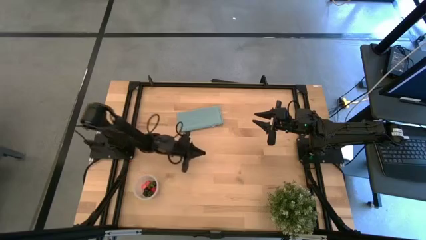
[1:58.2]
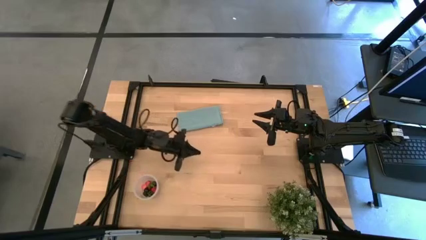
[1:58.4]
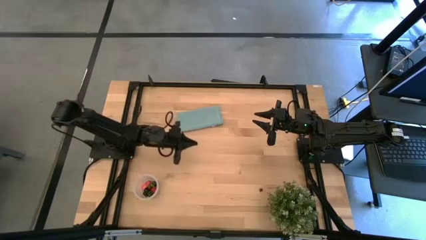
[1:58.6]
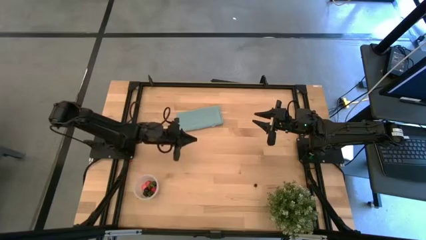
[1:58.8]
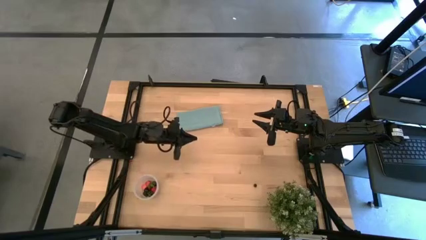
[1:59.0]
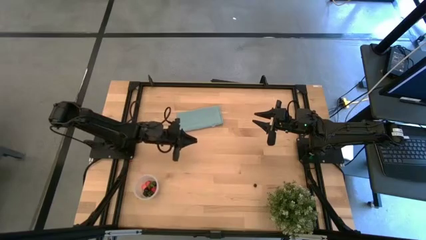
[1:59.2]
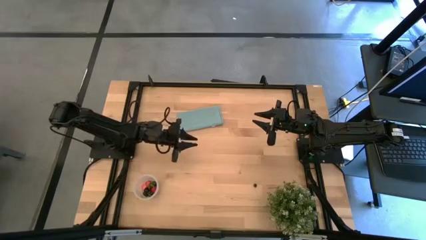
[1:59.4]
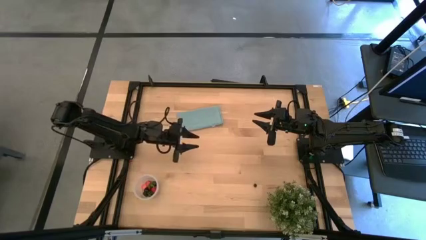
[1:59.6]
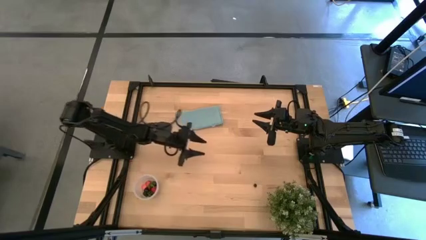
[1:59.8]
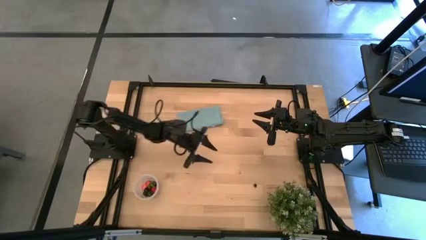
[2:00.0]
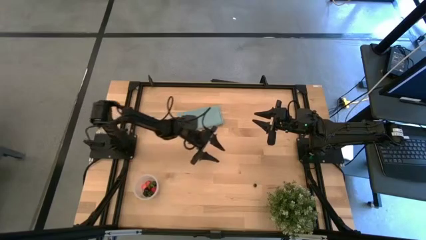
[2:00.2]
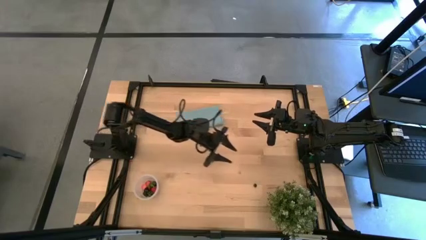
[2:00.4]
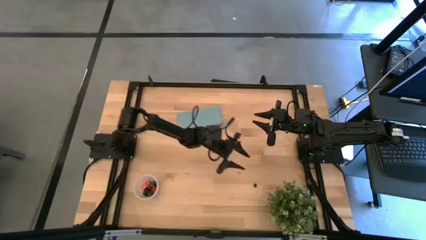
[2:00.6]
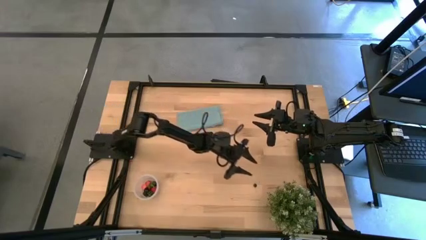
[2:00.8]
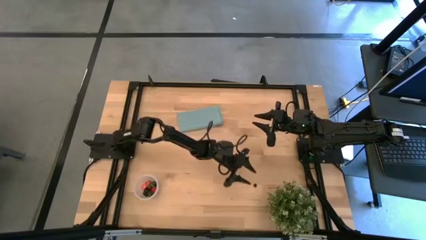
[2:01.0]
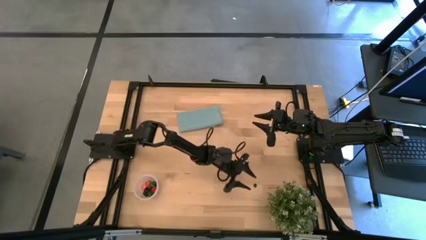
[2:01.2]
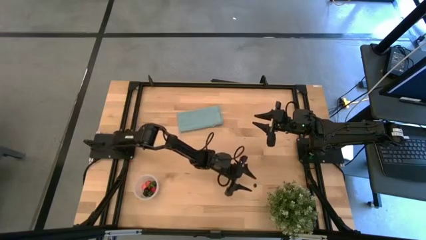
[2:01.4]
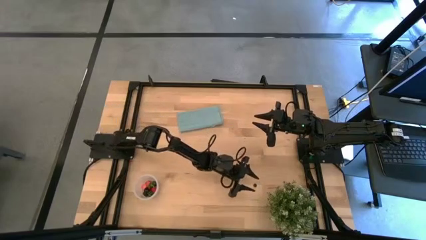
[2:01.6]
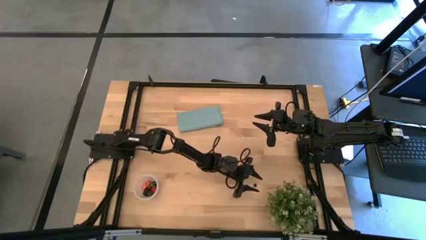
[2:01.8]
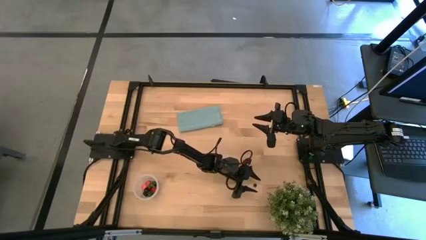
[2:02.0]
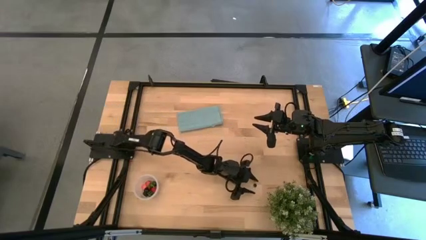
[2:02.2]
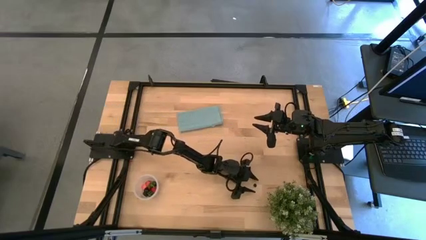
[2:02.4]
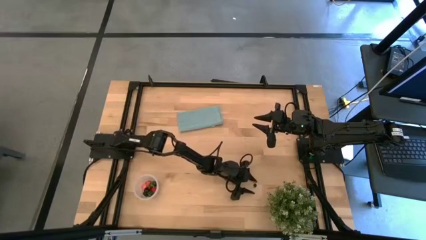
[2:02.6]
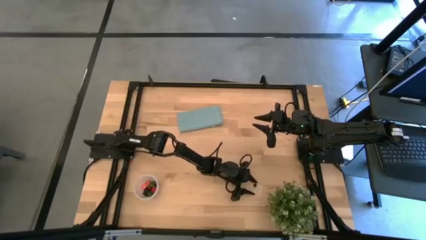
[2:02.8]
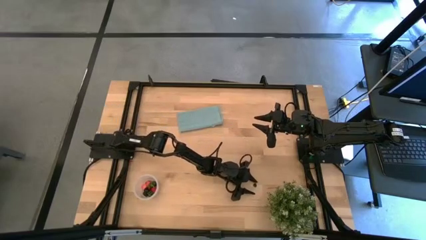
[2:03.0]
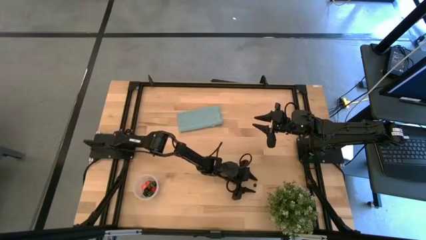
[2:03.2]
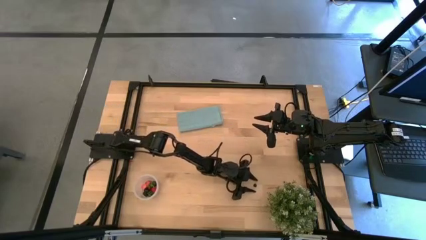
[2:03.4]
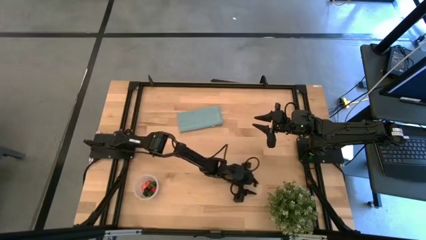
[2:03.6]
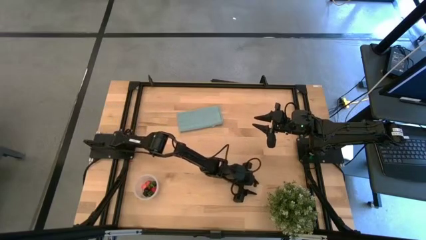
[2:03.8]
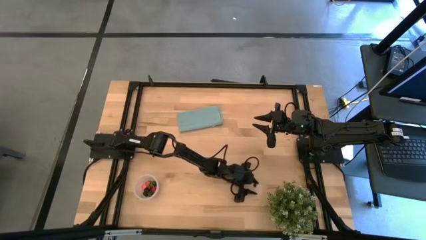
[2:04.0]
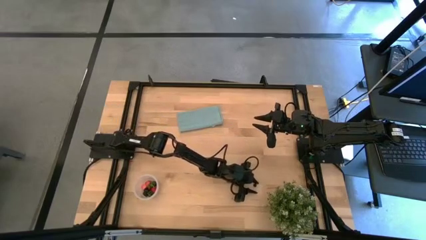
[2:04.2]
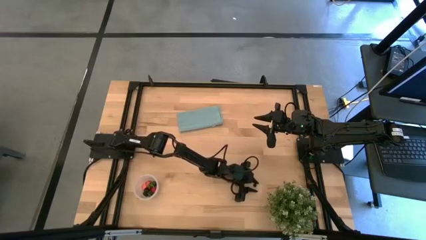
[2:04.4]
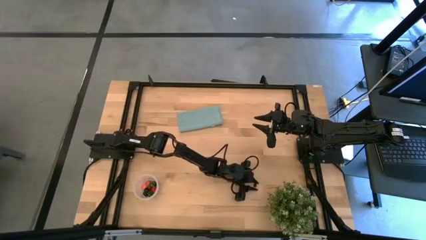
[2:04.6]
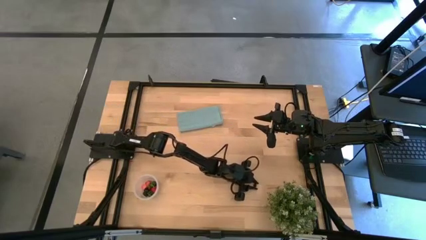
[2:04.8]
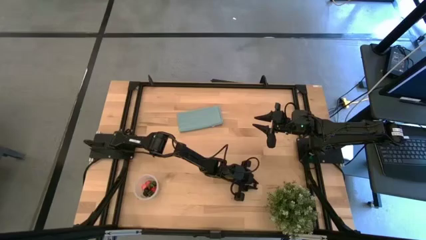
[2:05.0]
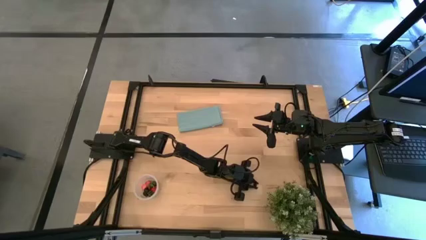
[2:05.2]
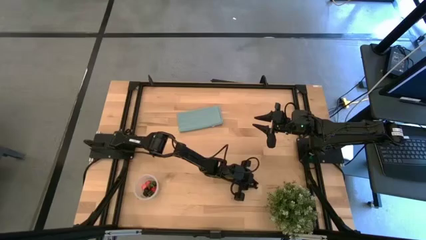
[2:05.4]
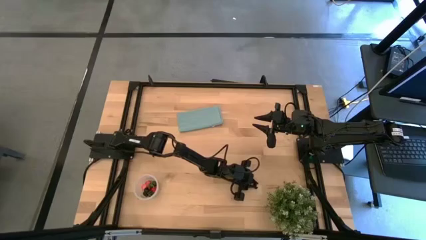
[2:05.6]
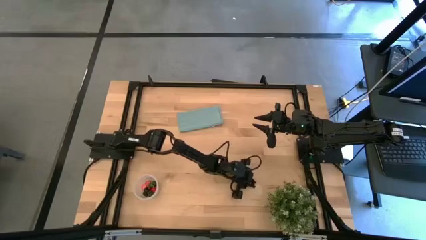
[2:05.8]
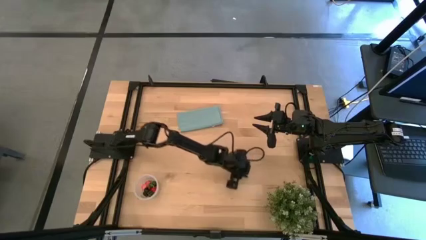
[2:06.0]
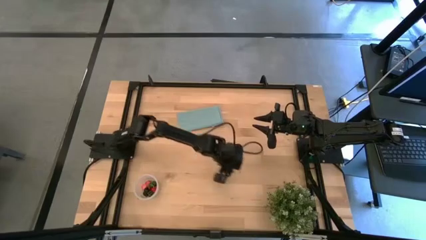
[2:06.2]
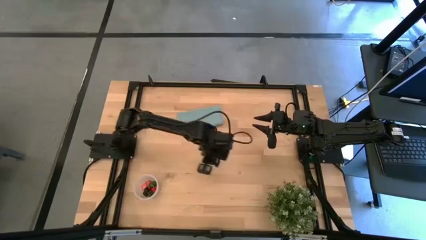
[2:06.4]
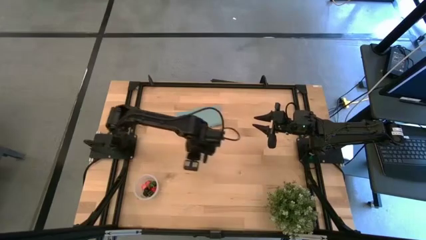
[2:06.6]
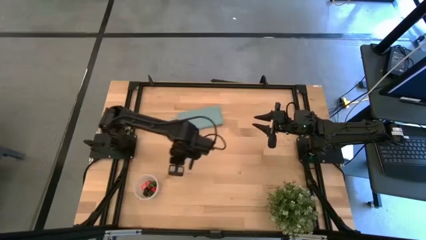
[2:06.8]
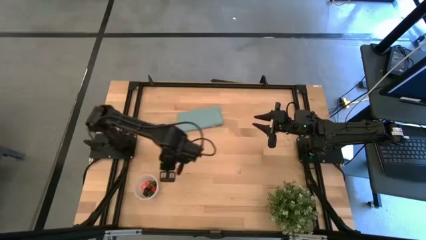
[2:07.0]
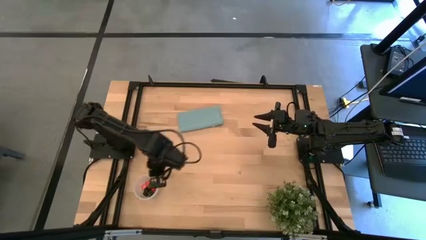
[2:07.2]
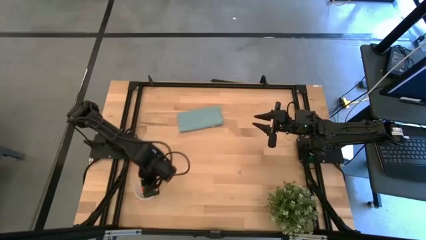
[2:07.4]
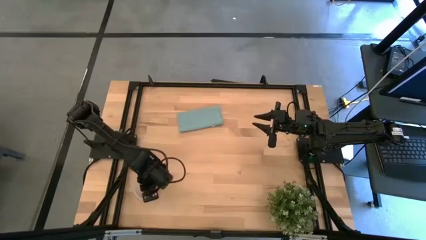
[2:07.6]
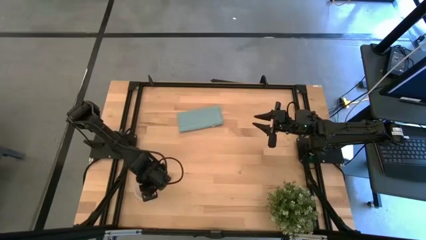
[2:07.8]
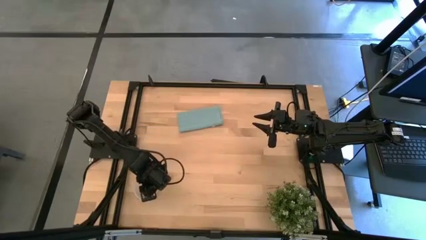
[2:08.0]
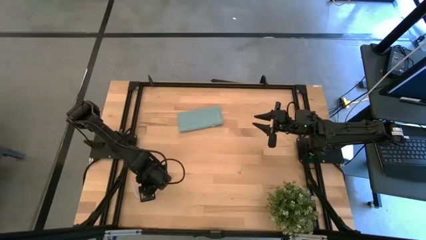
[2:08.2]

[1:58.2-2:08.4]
Task: Pick and placing Produce into tupperware
Put the blueberry into the transparent container

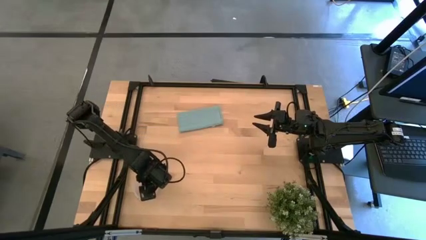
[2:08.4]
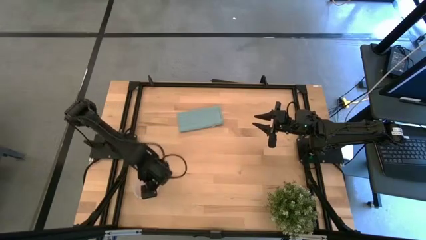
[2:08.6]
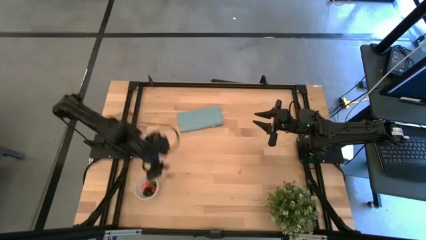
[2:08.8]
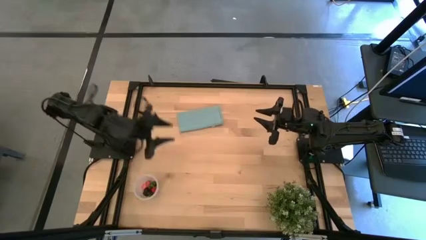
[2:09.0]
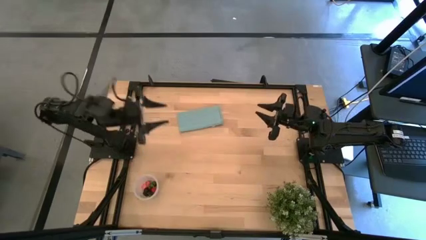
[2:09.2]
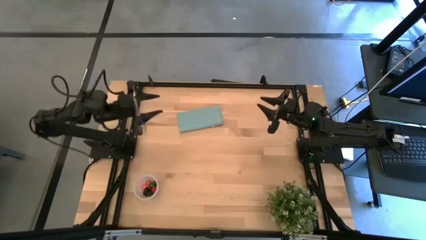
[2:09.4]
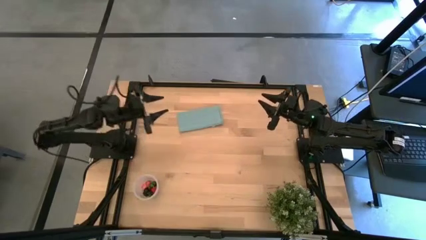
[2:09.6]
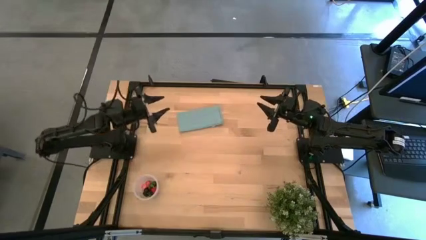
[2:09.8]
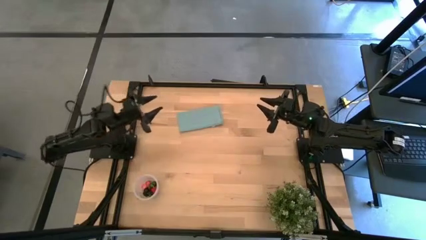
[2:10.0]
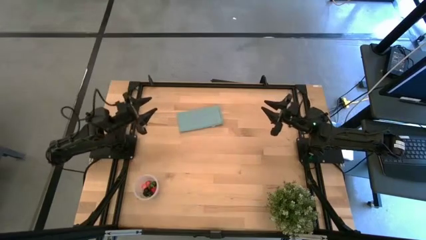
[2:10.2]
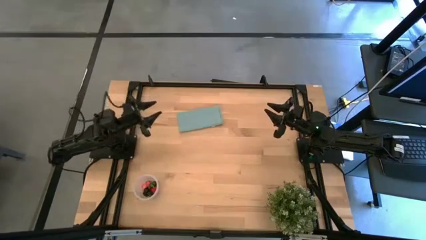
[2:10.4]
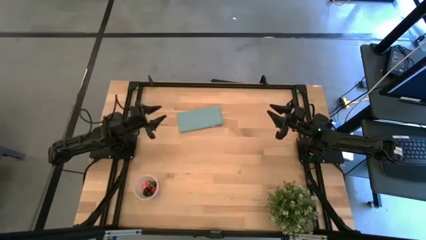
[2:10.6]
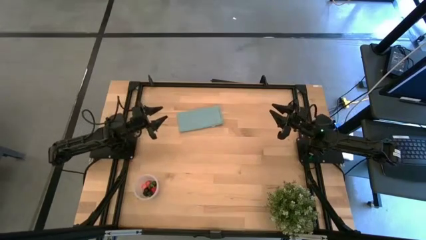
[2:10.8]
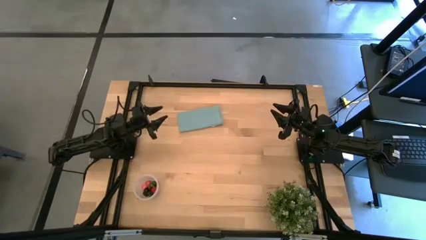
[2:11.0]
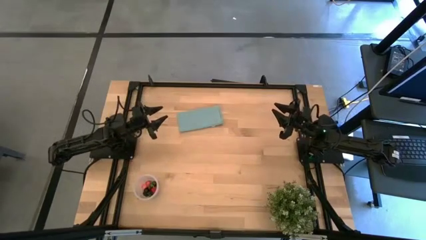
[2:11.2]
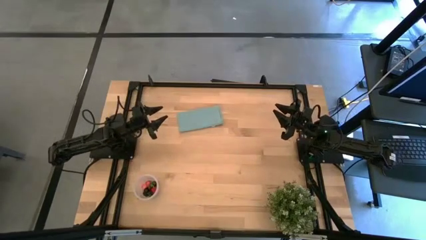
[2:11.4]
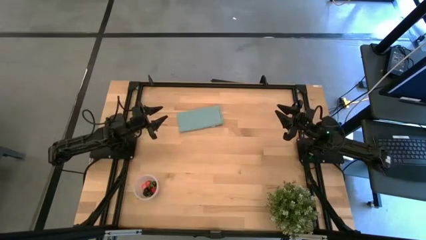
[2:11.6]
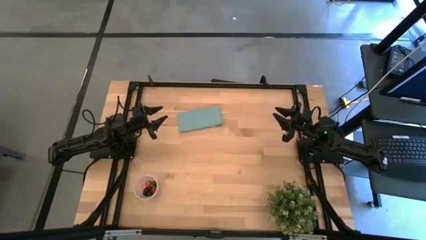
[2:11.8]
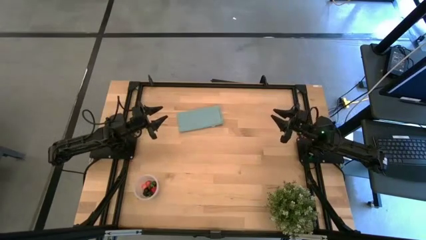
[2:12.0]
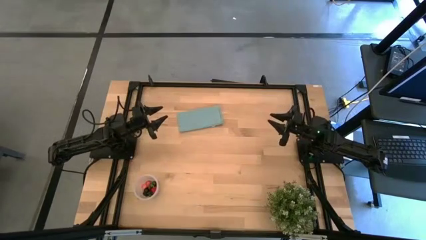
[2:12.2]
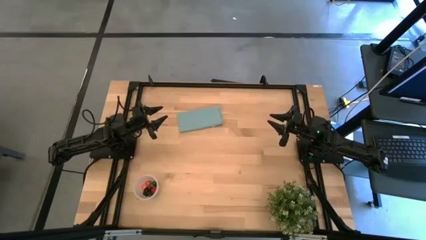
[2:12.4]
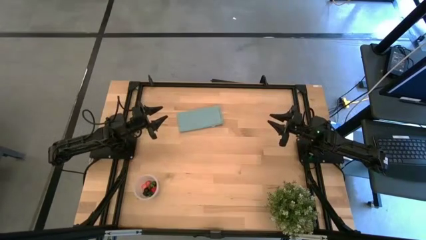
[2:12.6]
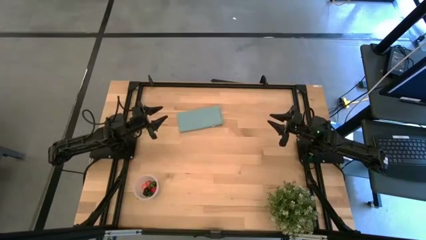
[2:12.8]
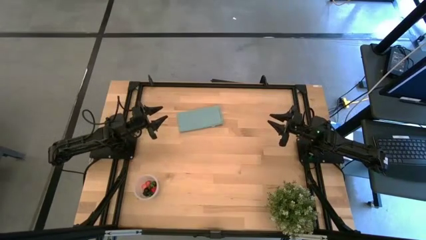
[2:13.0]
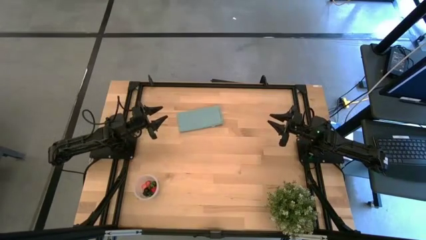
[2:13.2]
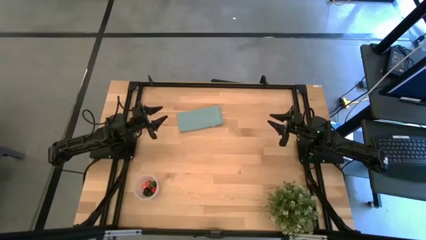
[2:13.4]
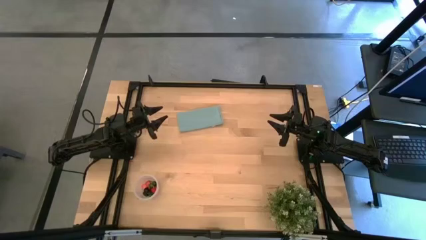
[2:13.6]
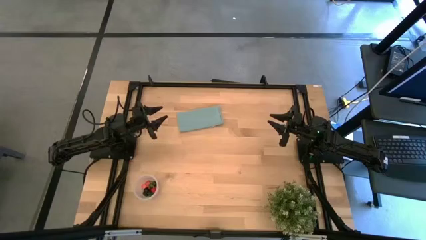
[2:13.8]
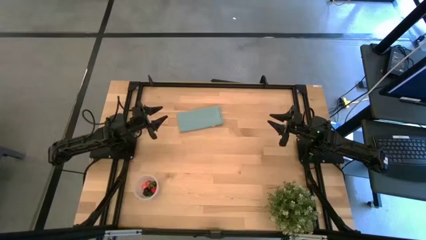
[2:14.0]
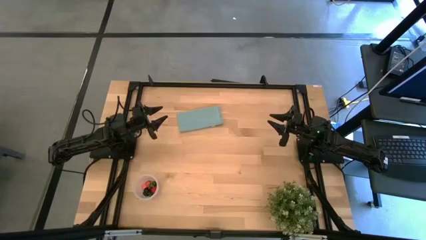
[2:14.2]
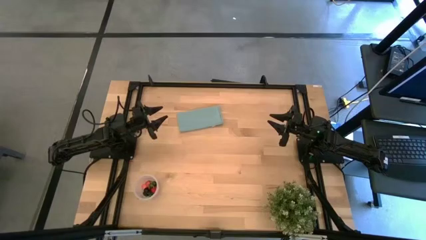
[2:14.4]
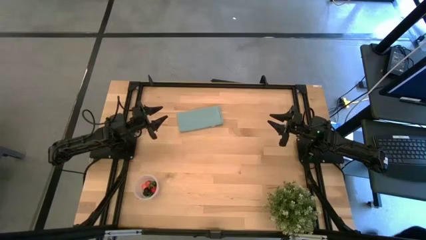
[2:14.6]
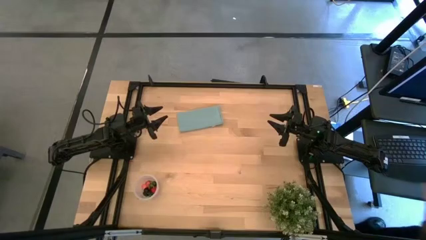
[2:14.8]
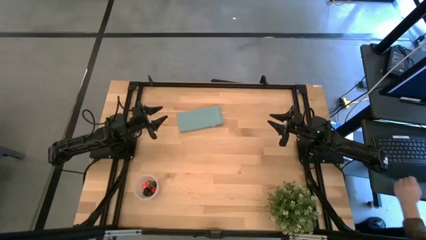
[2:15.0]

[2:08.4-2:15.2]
Return to Home Position
